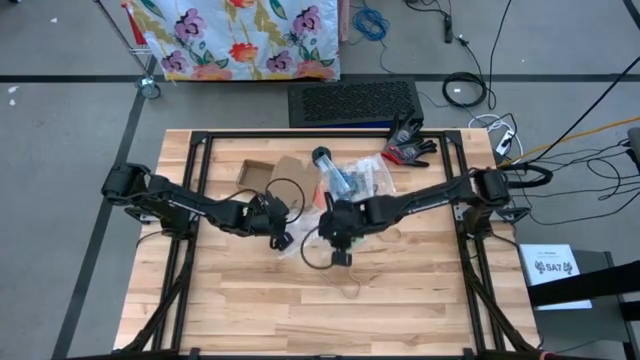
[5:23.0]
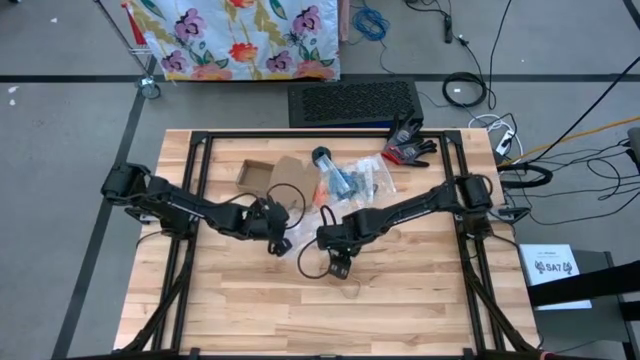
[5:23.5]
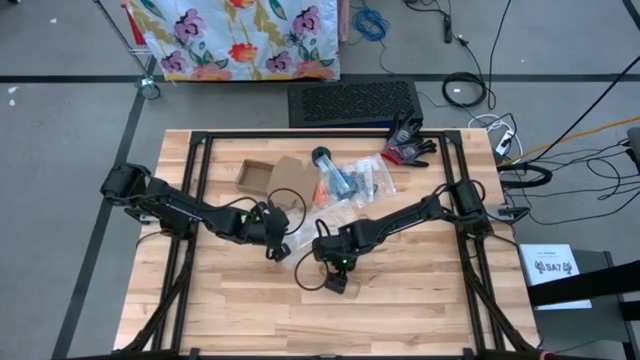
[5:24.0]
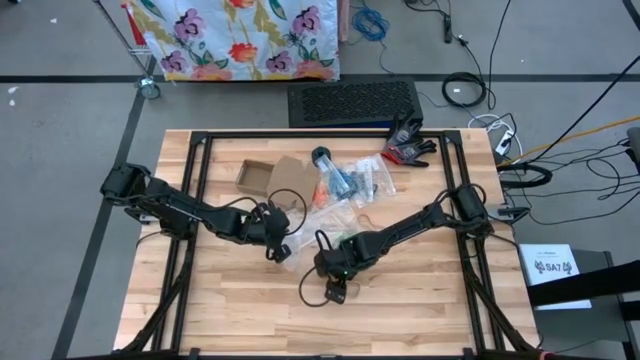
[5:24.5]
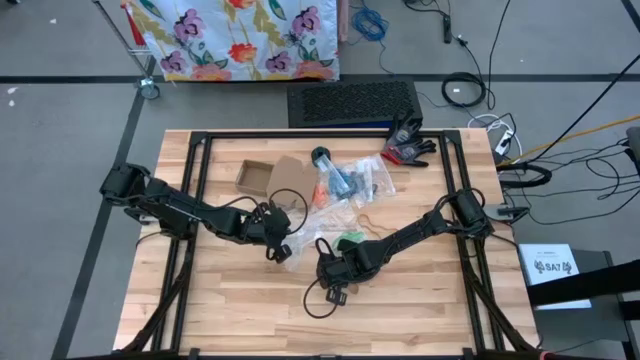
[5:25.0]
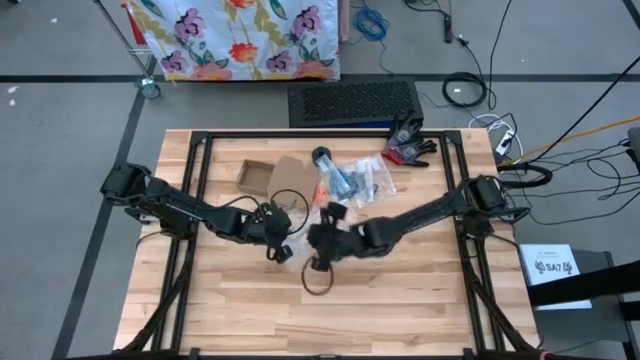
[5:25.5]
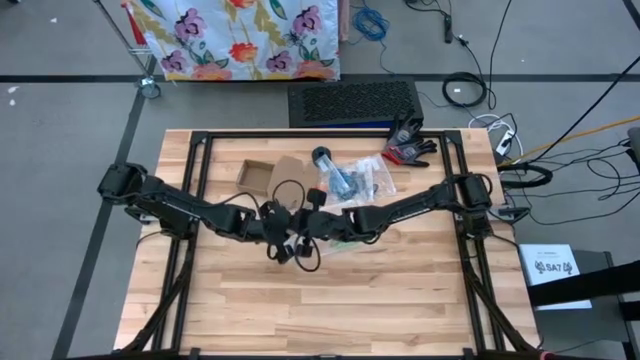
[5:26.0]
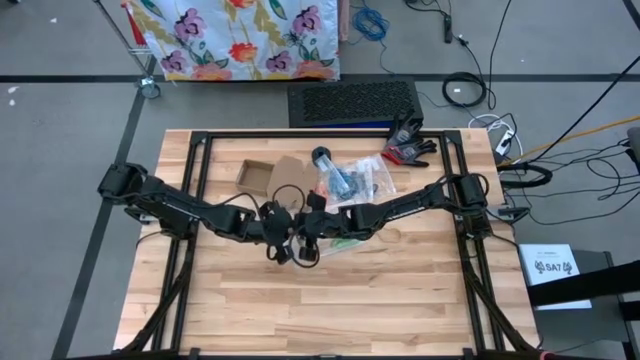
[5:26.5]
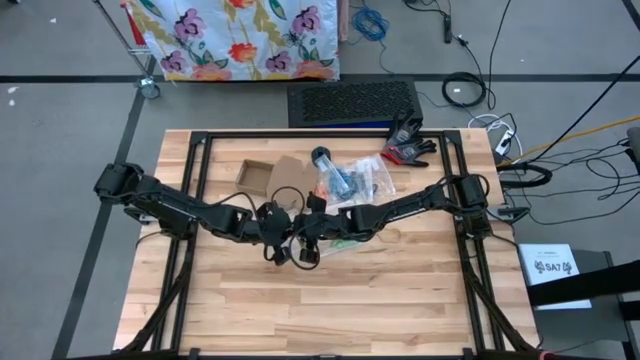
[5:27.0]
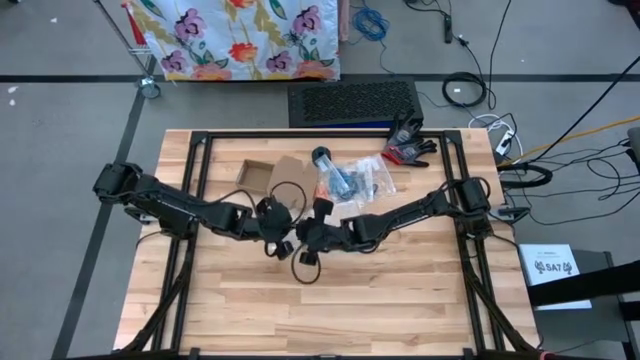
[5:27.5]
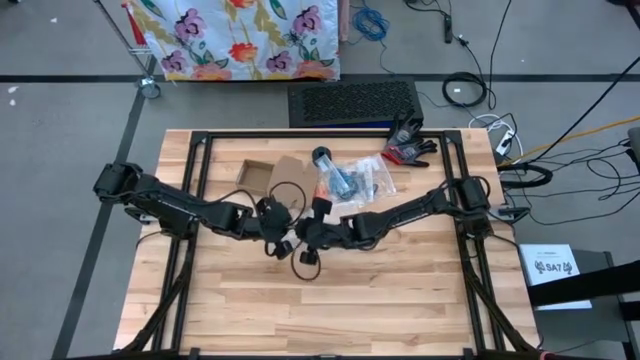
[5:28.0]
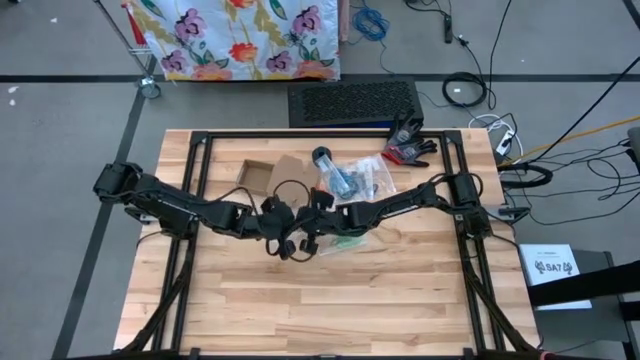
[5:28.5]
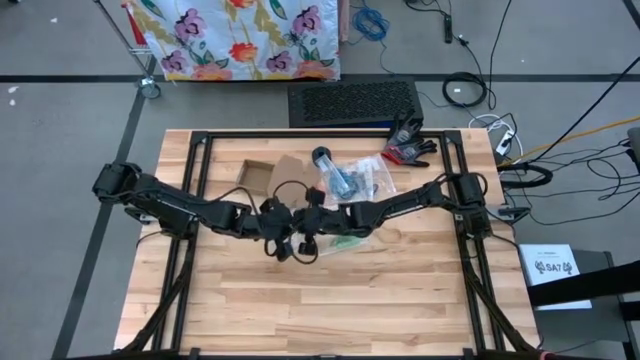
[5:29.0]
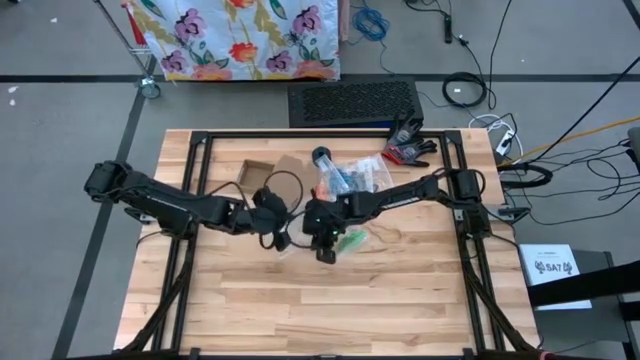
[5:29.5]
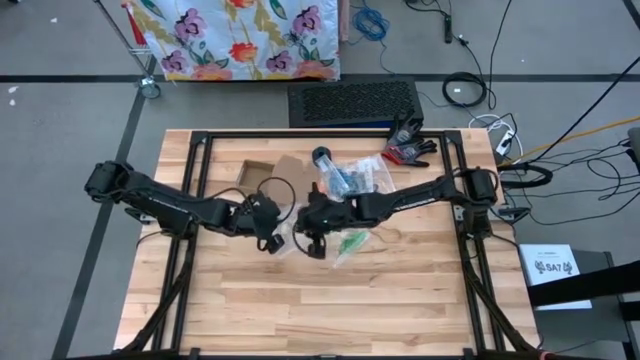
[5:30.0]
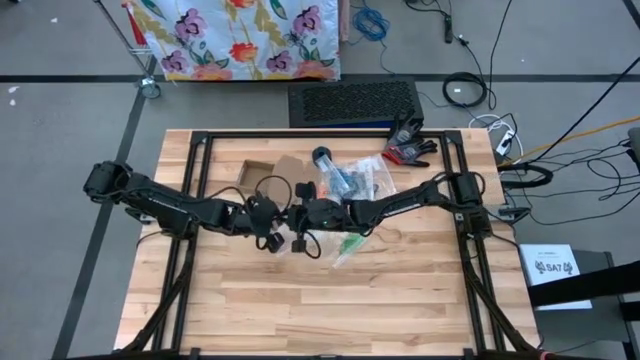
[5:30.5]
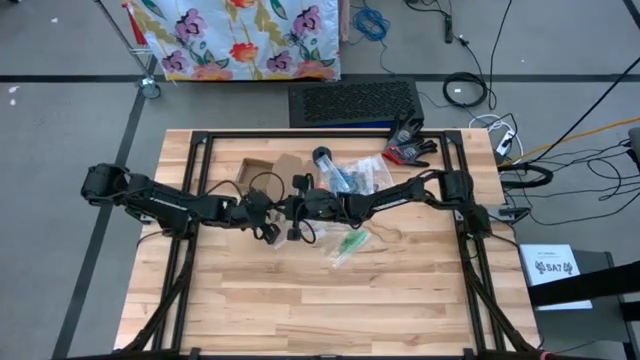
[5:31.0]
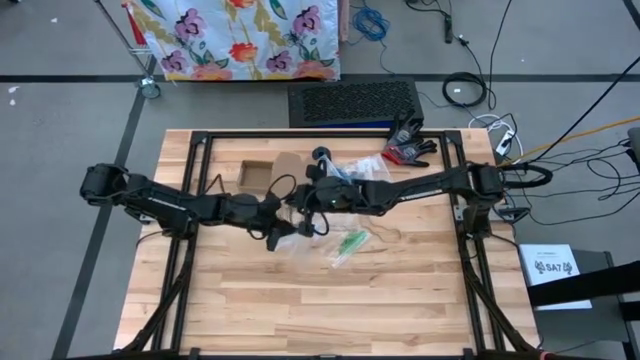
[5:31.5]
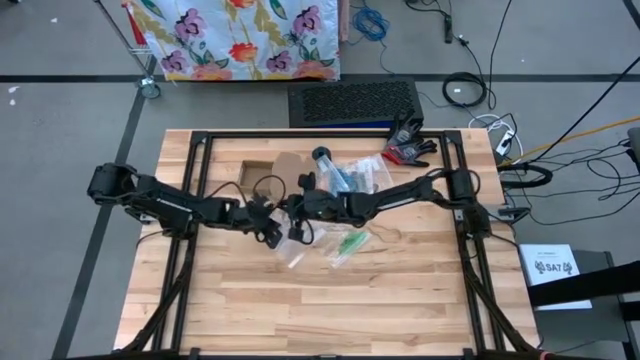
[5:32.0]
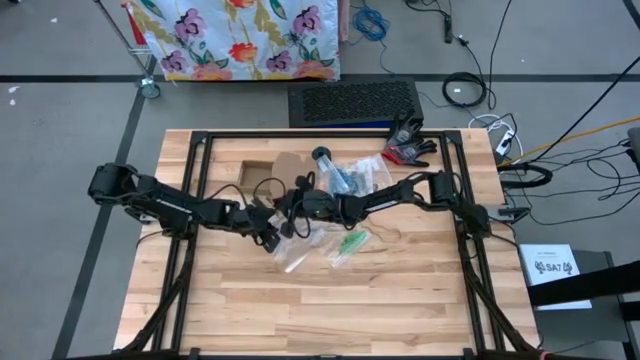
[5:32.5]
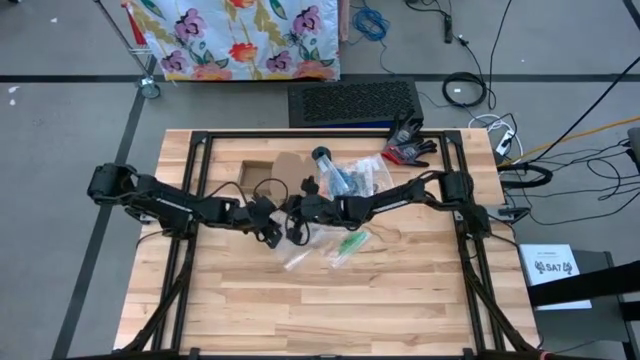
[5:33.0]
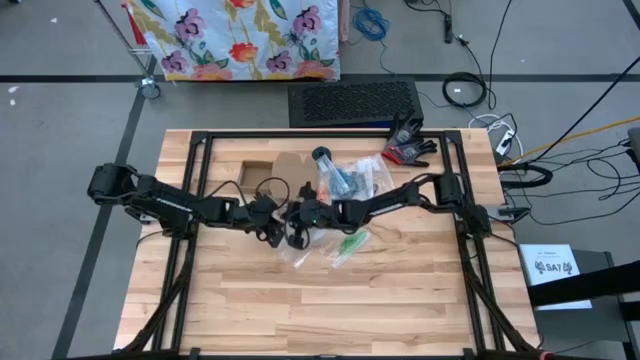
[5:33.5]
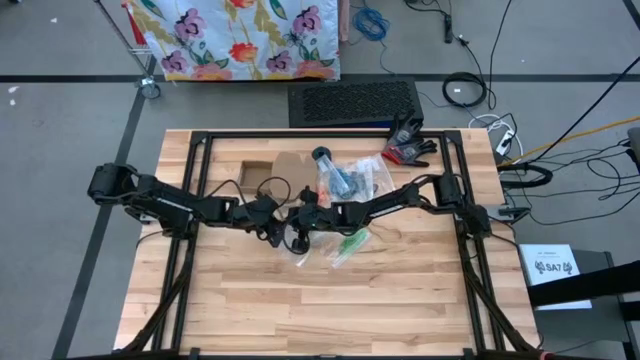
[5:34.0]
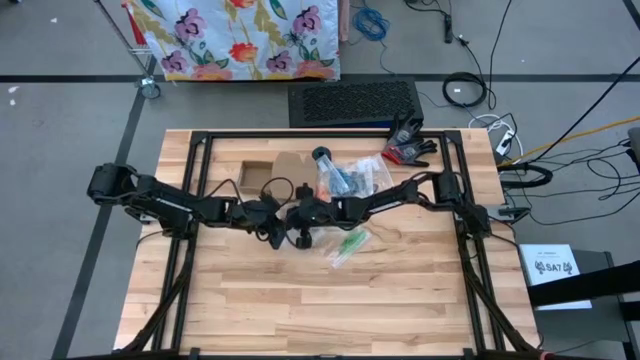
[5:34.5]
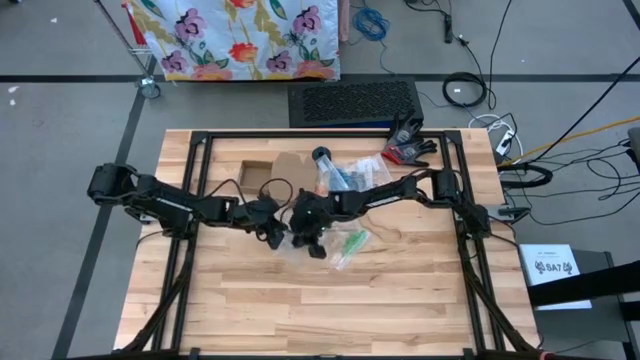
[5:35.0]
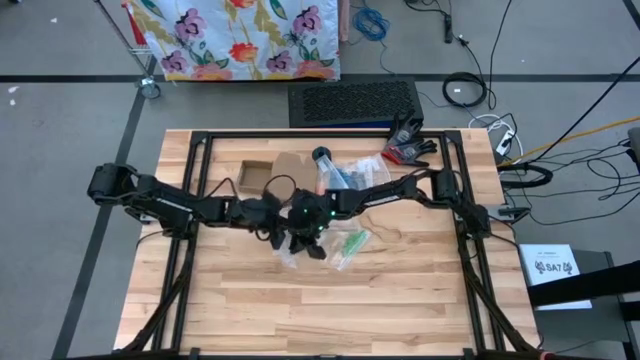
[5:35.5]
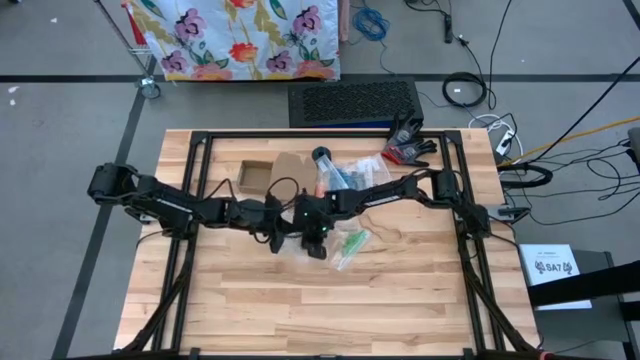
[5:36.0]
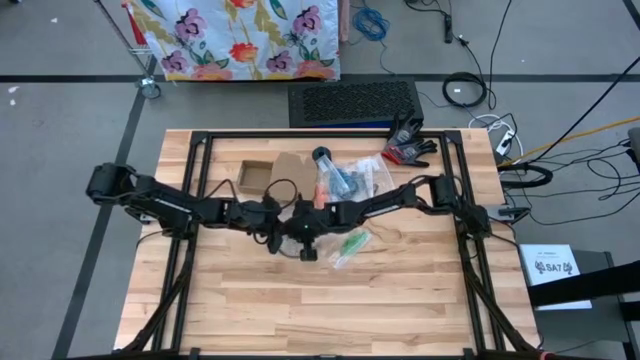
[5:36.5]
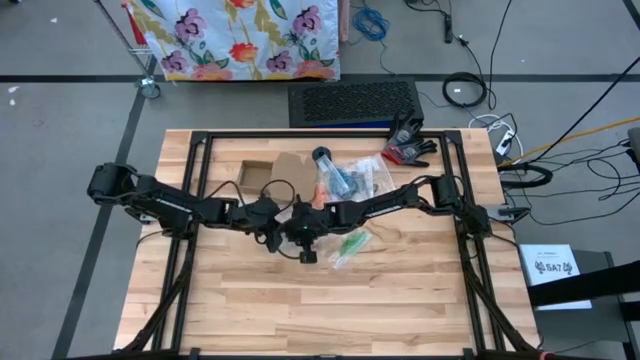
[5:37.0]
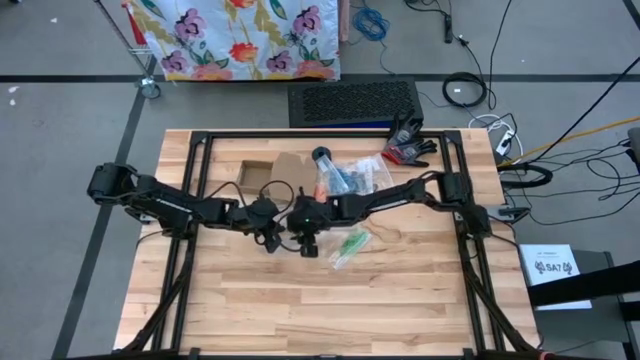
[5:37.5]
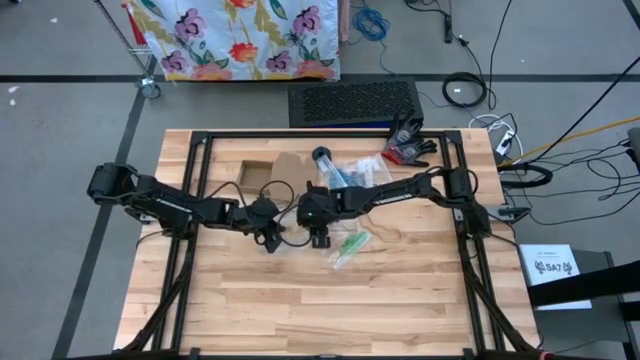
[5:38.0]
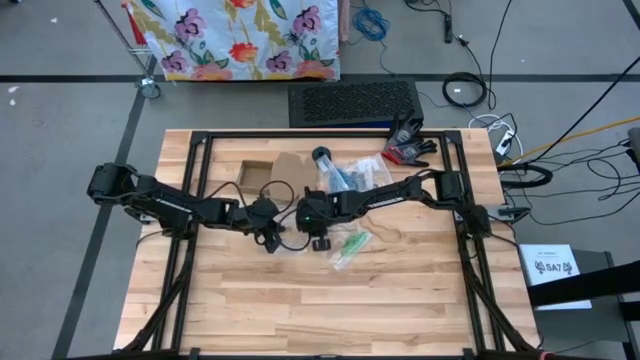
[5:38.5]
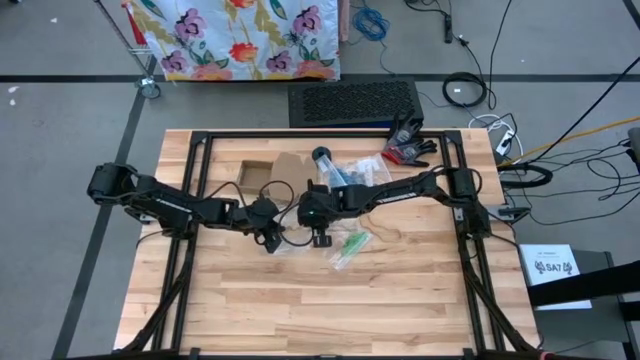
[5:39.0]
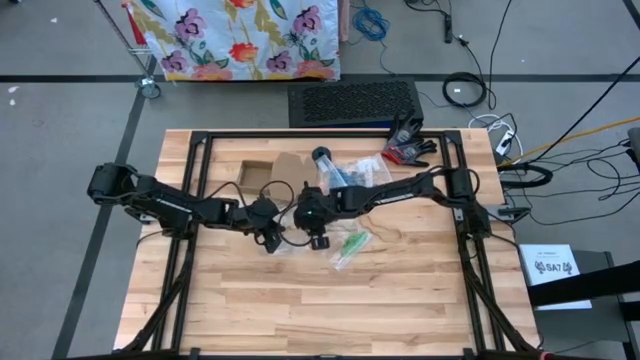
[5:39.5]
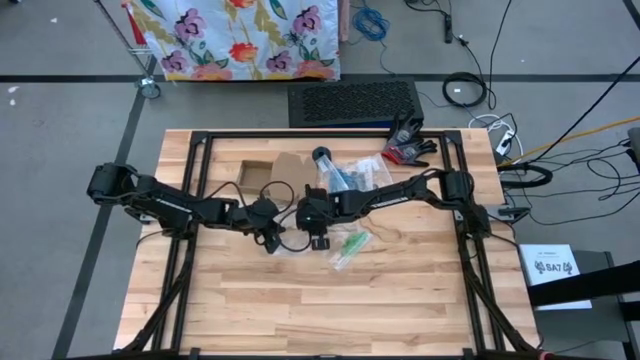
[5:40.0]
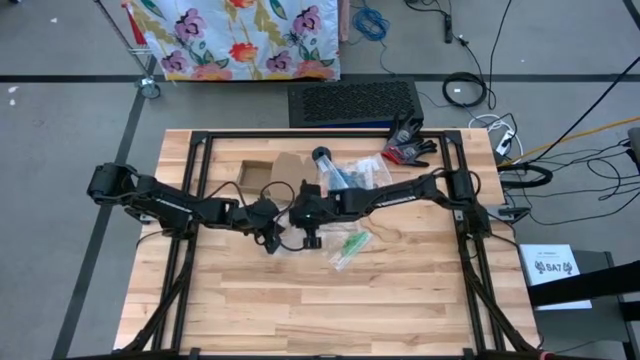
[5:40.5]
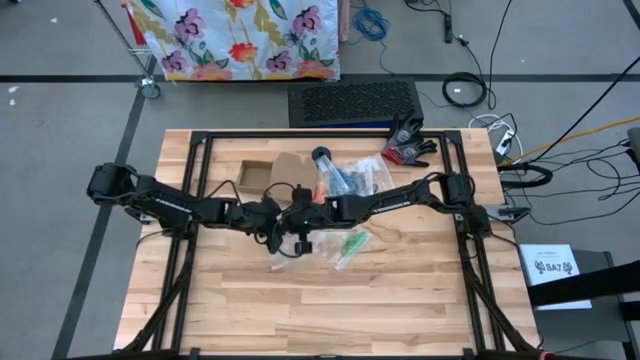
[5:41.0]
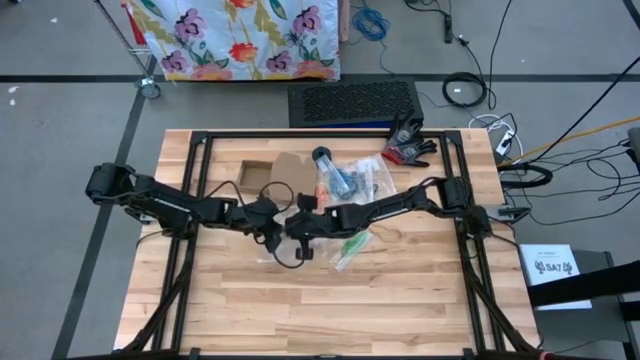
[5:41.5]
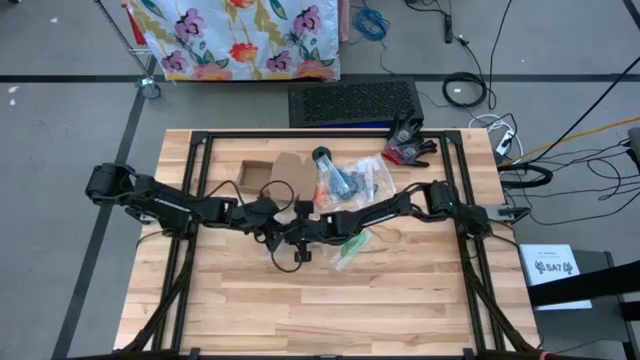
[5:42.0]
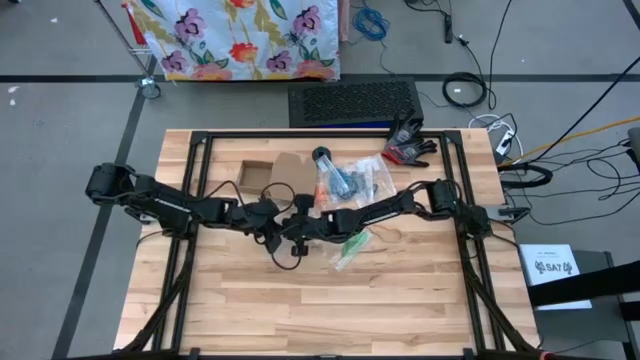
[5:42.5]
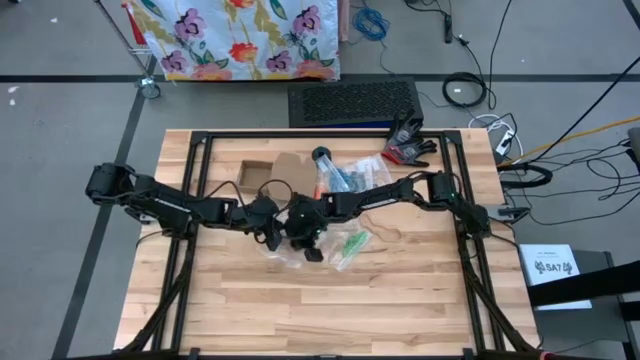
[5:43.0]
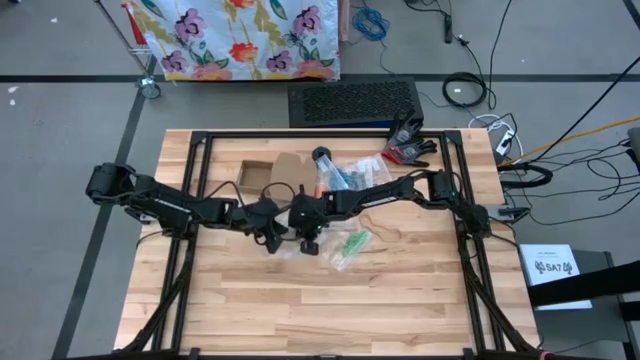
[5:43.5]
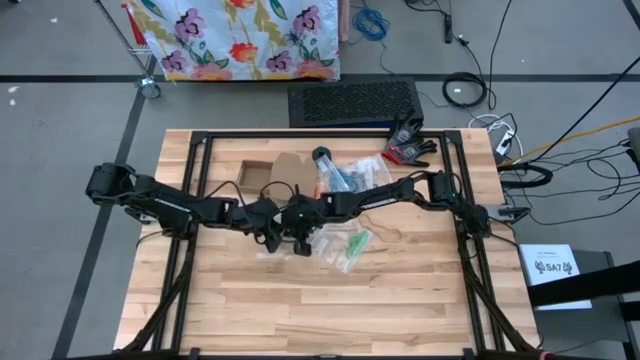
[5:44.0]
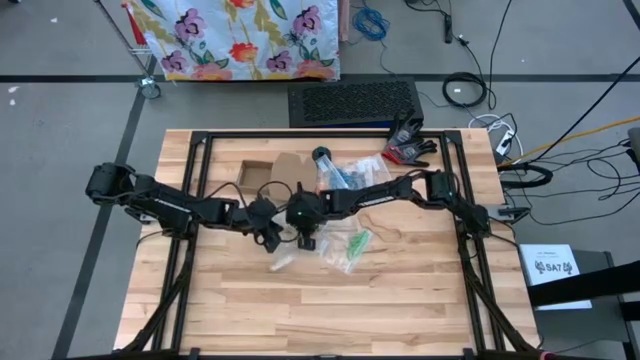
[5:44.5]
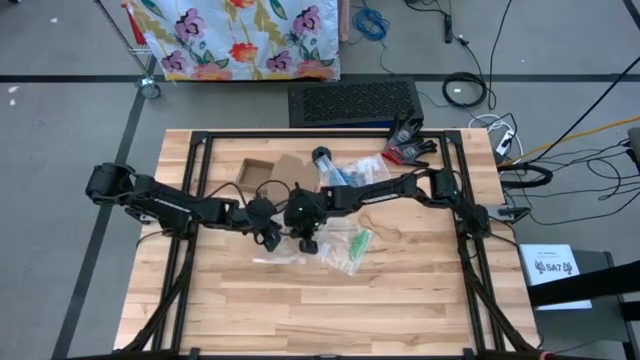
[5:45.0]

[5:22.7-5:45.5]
Task: Sort rubber bands
Put the brown rubber band into the transparent zip bag
